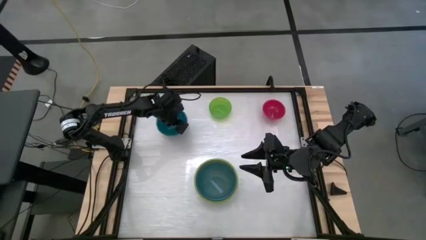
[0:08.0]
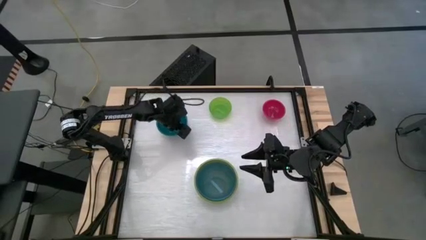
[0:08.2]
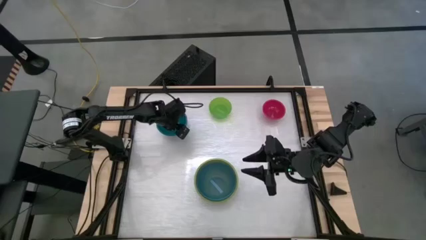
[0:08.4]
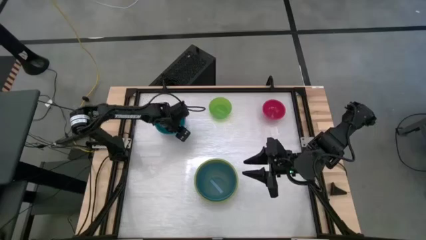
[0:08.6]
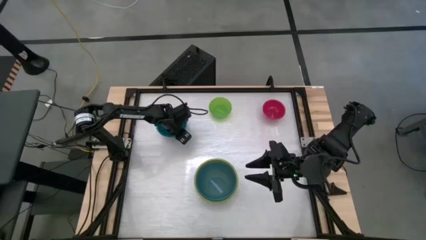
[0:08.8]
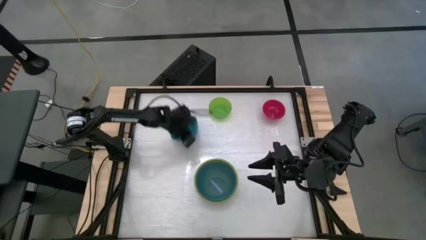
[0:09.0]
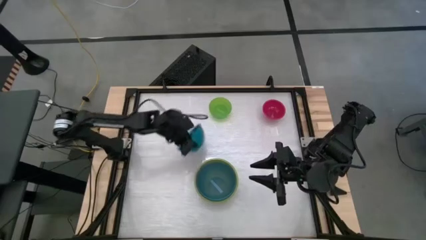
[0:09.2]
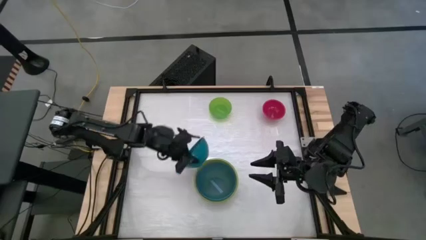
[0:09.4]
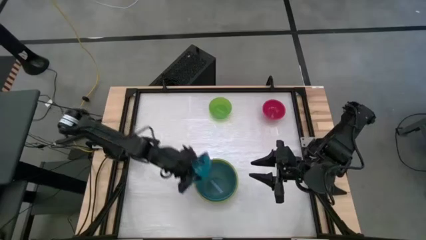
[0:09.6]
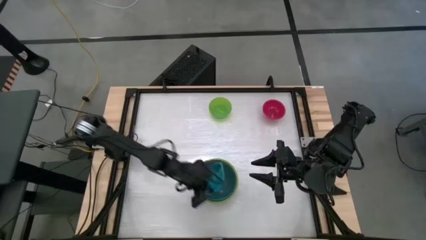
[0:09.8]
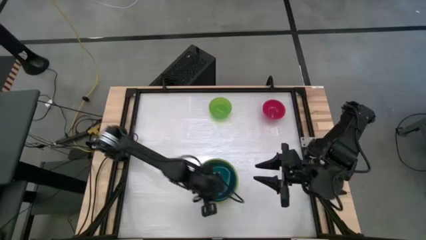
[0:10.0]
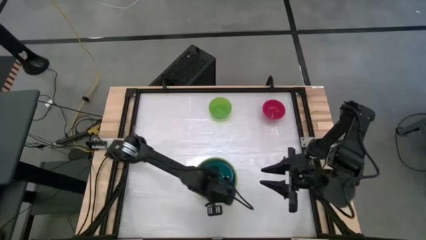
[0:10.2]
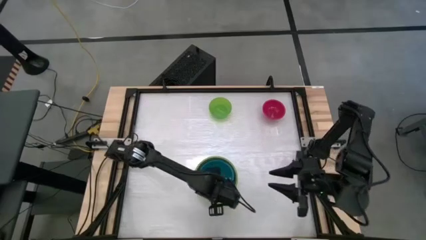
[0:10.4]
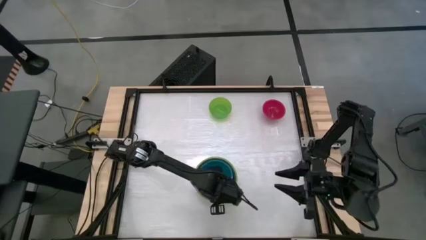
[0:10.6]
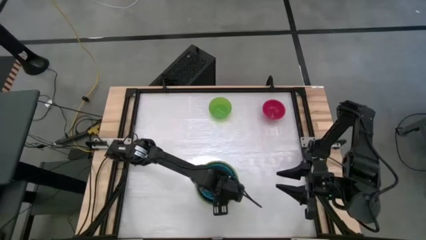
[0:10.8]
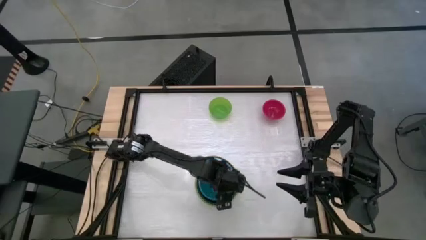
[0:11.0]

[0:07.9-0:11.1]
Stack the dark blue bowl on top of the blue bowl

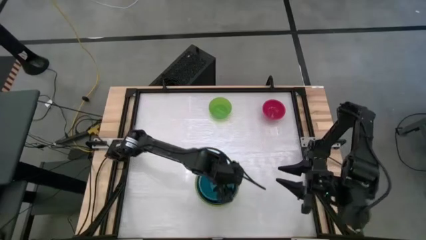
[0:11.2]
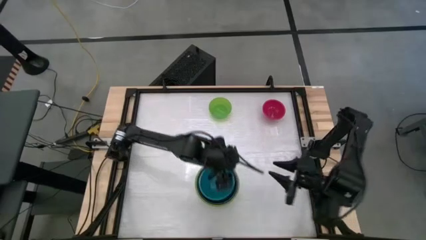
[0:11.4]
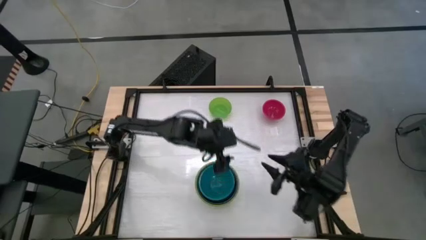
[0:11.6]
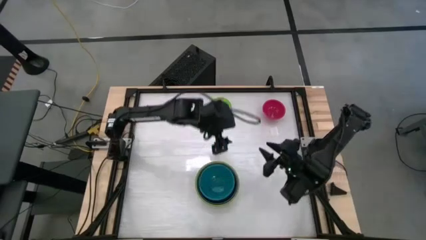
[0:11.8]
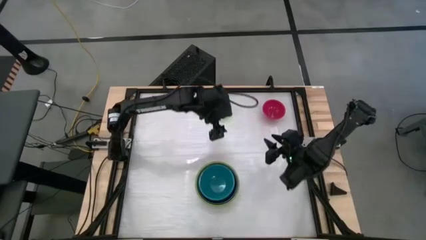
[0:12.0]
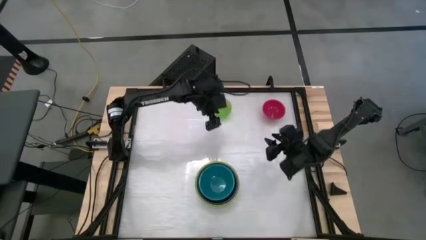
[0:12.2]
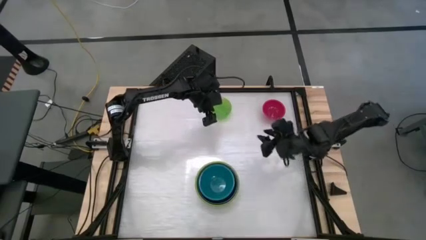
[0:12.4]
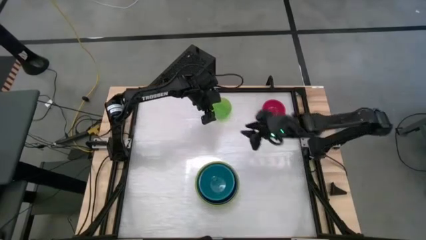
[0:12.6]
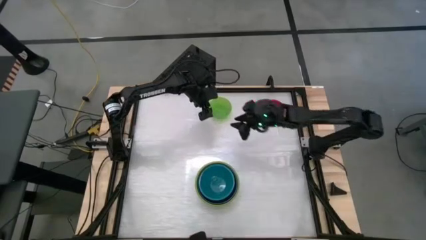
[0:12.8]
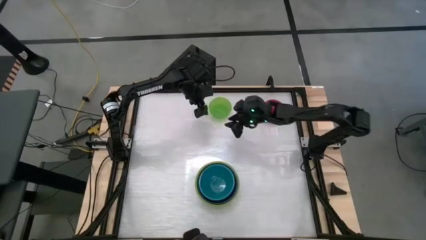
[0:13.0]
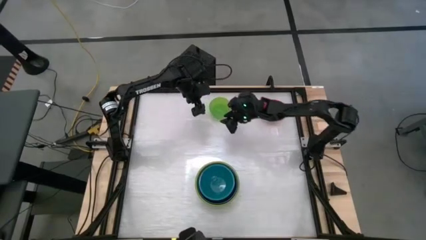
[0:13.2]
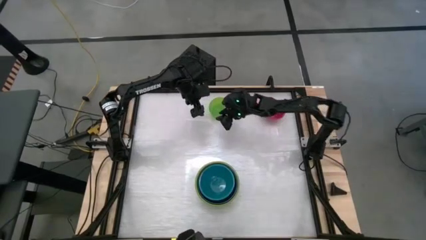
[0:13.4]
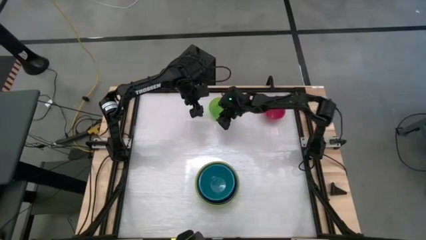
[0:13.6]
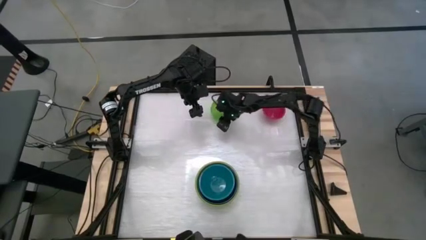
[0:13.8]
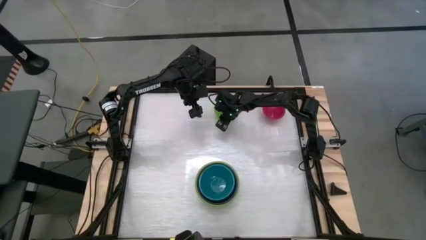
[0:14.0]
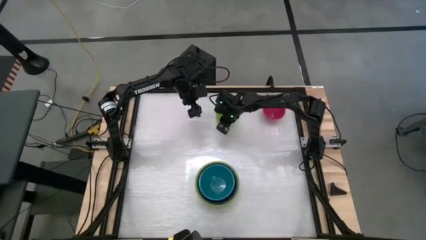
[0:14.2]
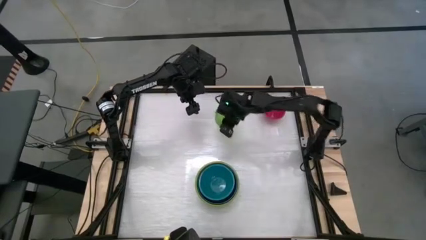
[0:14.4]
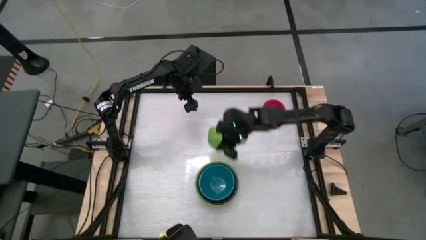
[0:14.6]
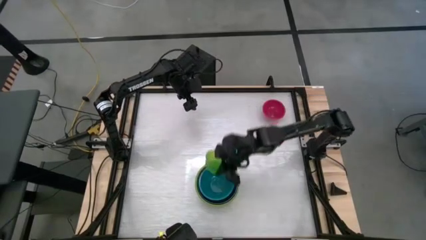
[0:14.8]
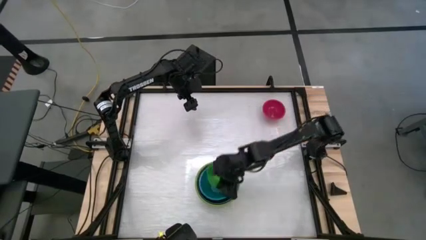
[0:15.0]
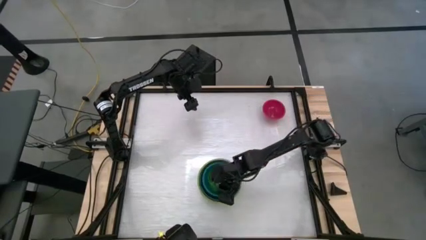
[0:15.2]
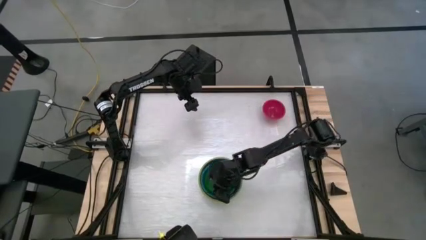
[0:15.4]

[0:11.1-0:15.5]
Stack the light green bowl on top of the dark blue bowl

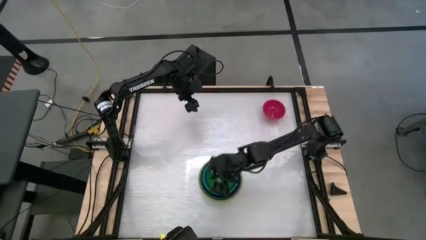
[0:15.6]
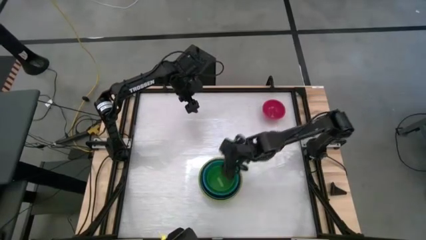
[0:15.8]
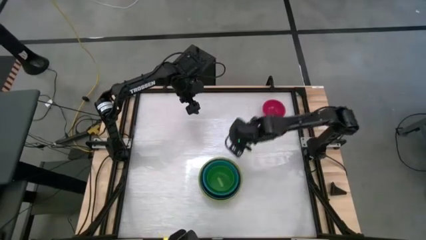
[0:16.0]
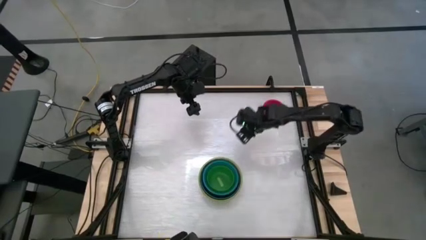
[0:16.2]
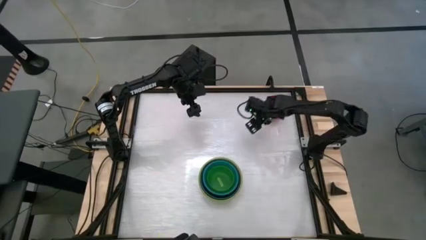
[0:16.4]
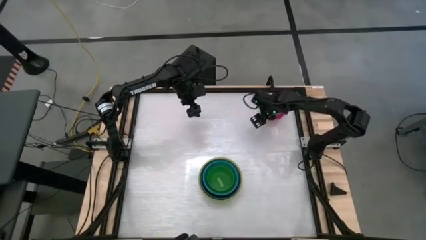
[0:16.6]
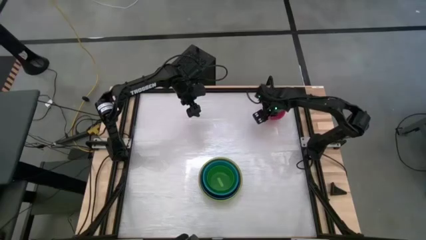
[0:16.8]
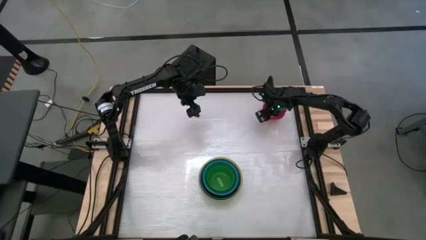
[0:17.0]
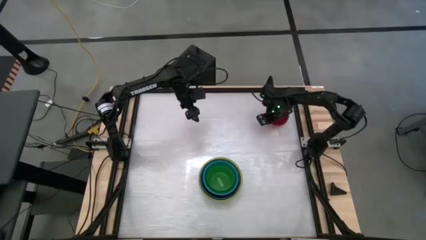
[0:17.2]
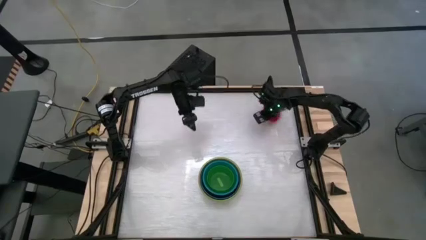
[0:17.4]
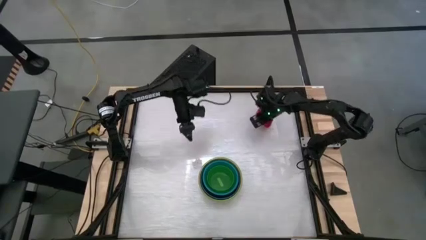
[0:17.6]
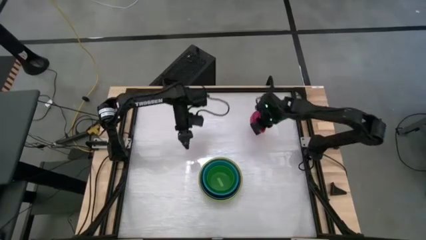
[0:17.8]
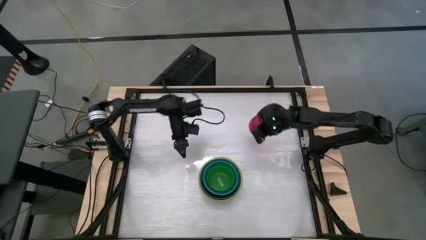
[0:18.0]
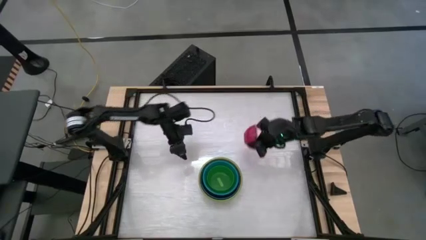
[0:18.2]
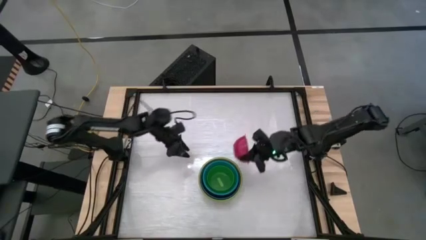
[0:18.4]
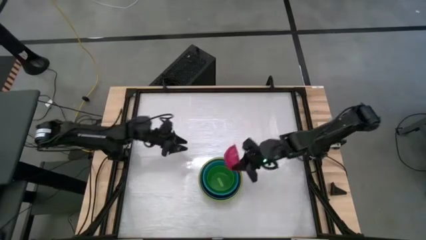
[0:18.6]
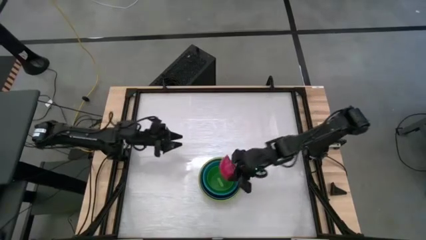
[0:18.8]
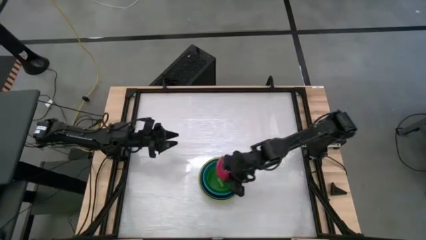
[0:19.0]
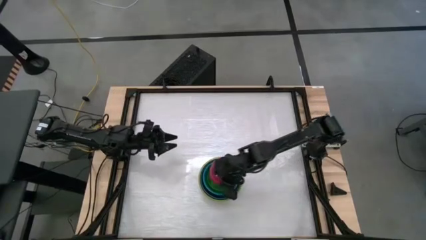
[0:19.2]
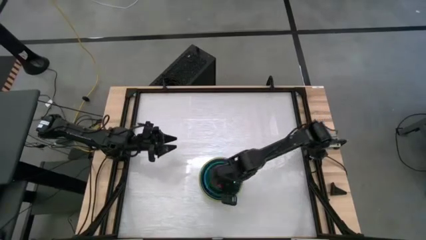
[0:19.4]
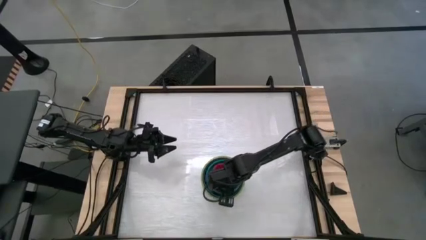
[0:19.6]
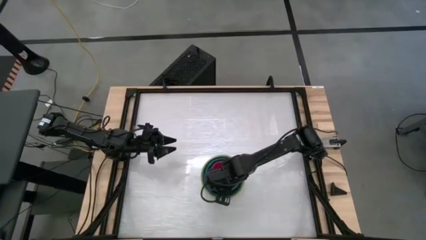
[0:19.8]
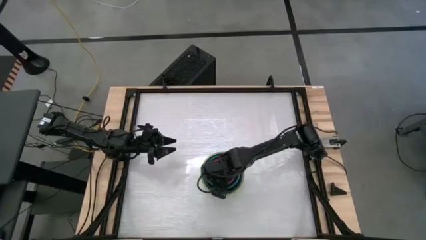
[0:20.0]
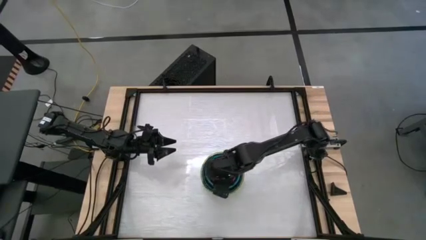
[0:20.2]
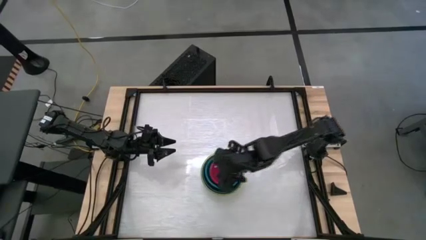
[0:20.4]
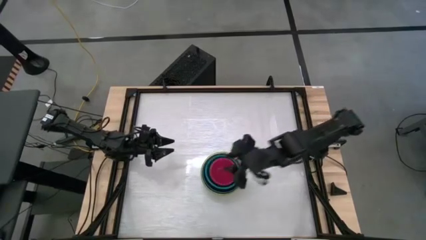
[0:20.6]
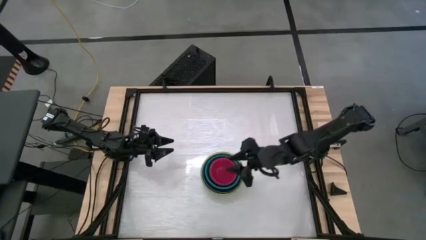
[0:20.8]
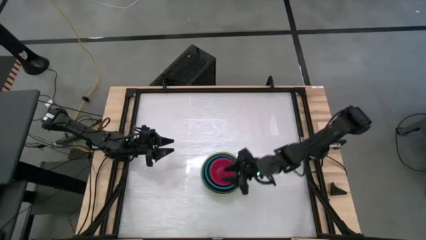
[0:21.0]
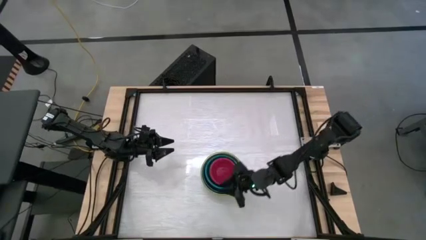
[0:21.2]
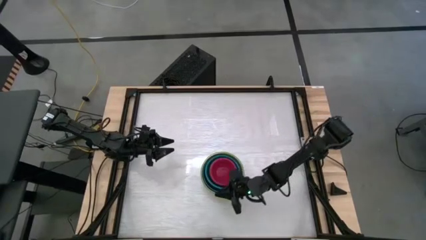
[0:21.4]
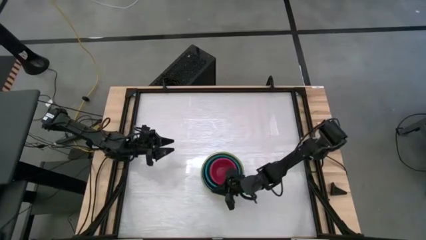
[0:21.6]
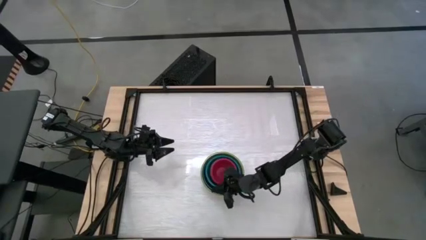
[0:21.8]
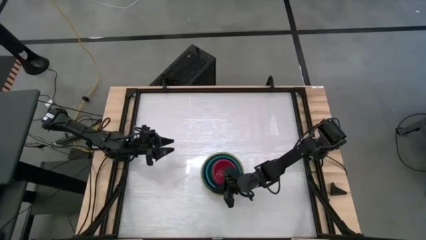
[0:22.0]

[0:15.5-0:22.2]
Stack the red bowl on top of the light green bowl

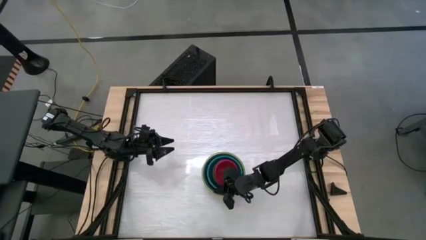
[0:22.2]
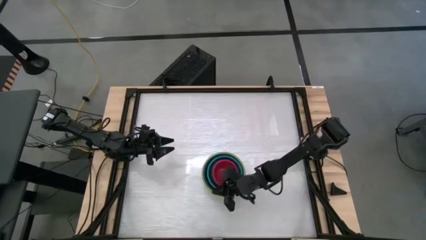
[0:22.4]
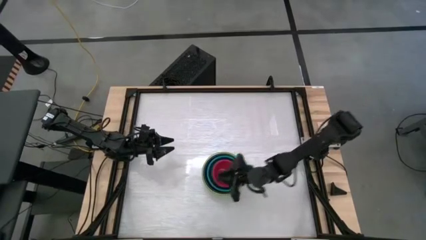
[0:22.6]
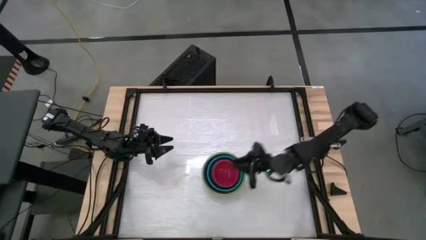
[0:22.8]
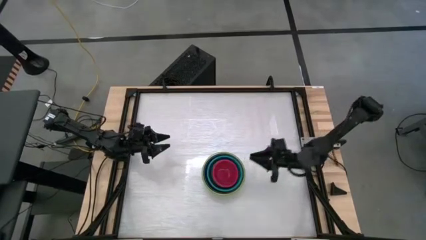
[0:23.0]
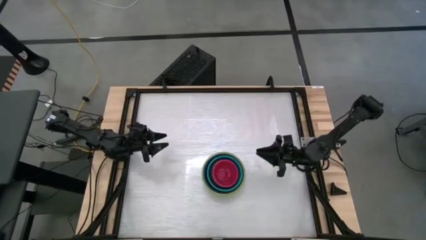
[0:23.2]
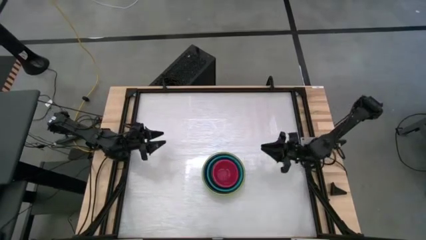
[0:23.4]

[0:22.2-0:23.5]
Return to Home Position

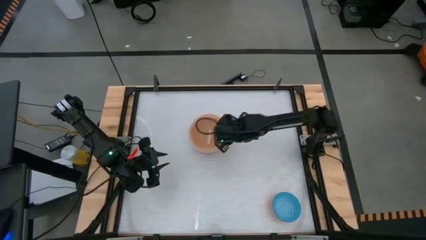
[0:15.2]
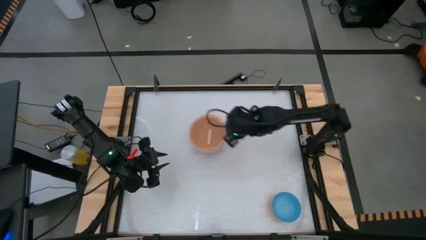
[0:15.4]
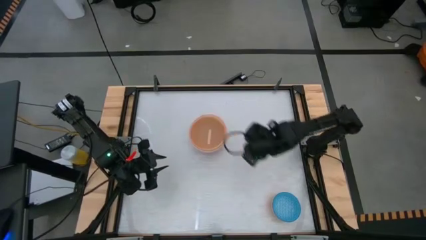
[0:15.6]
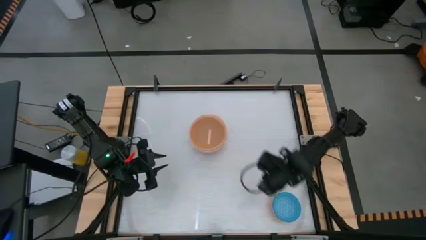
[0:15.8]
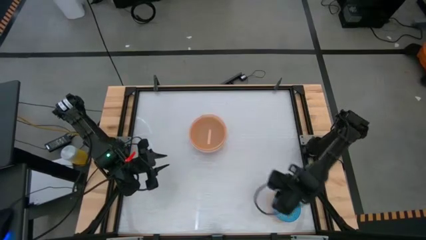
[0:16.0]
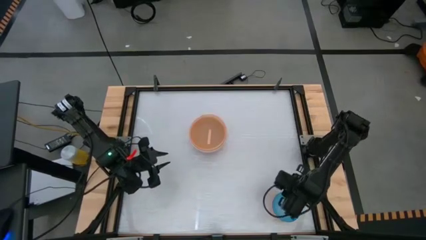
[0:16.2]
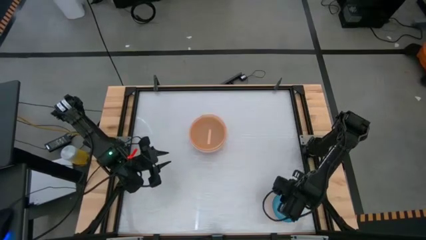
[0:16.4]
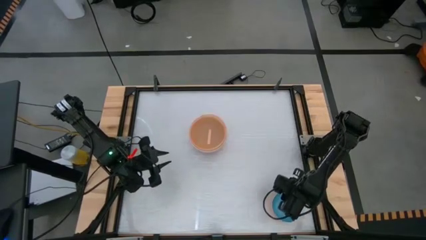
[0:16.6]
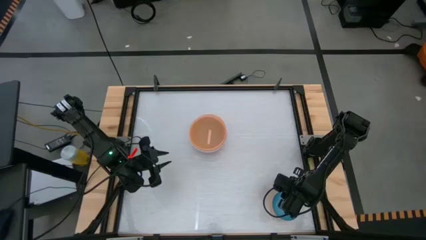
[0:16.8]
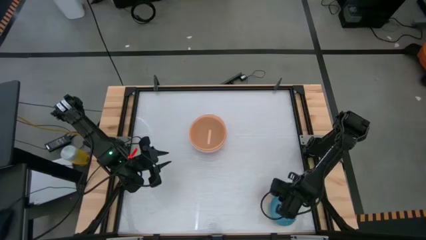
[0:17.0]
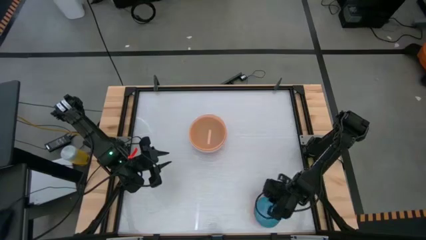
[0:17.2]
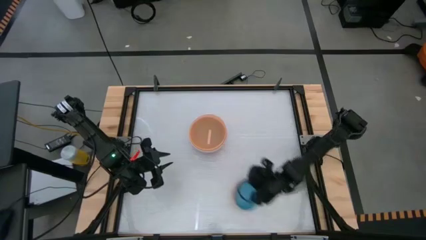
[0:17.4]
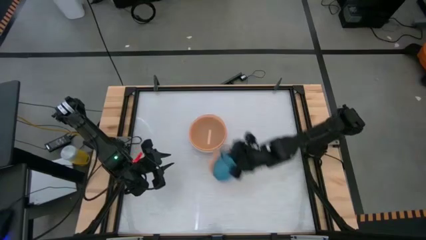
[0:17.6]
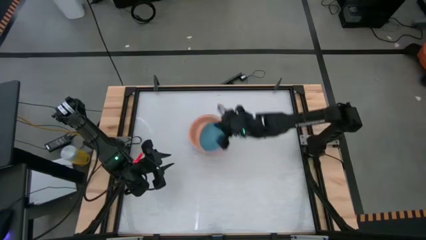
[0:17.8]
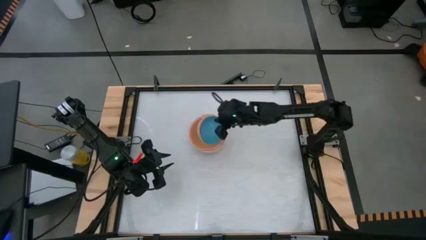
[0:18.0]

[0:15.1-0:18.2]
Stack the blue patterned bowl on the orange bowl
